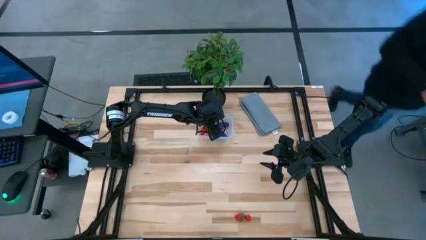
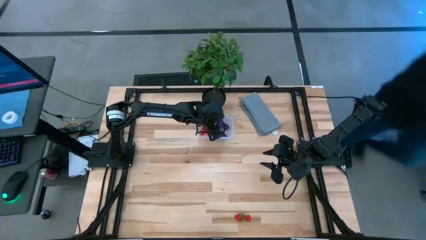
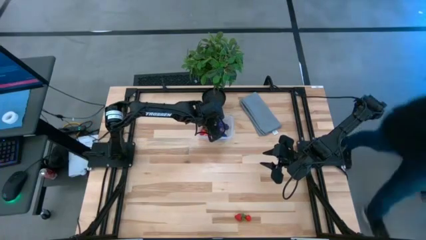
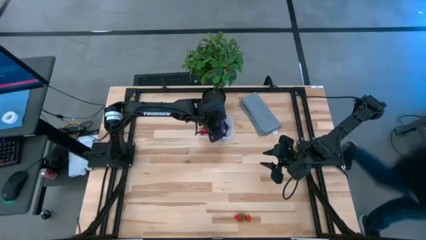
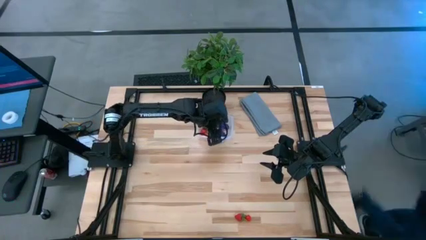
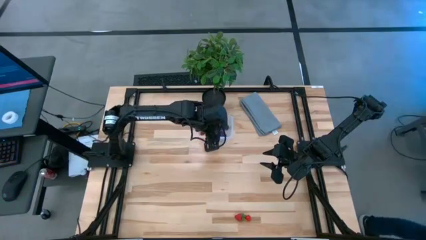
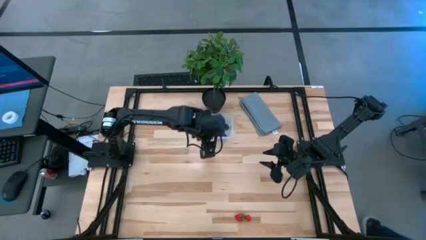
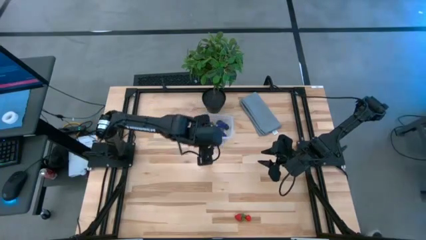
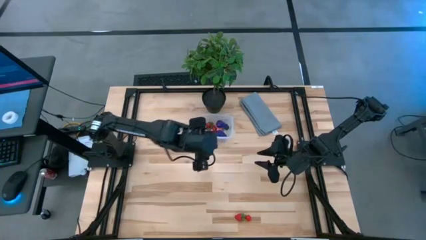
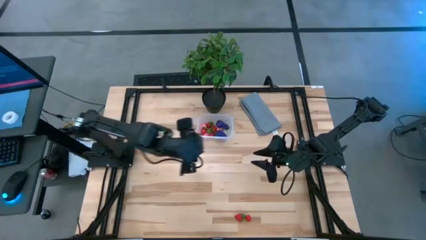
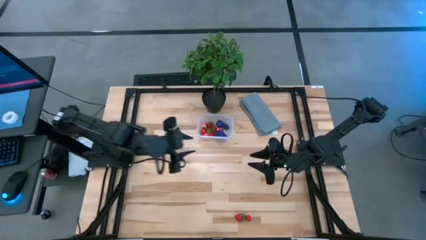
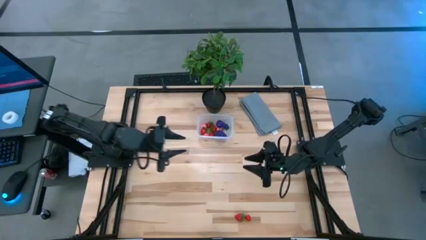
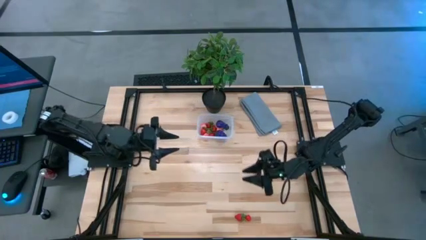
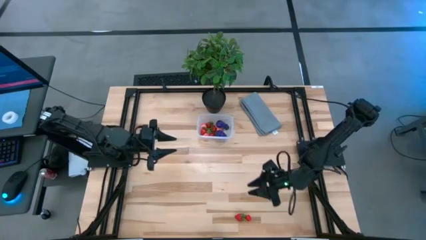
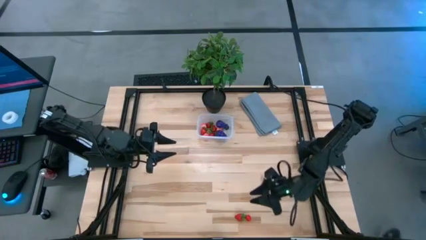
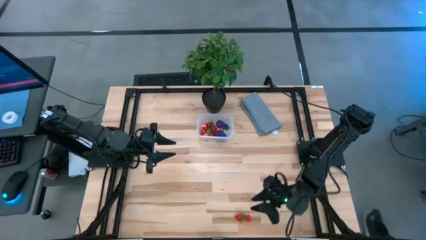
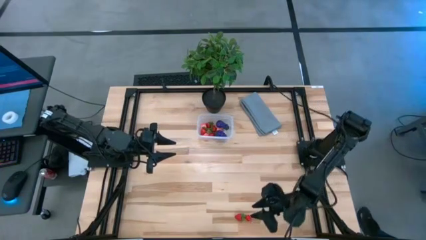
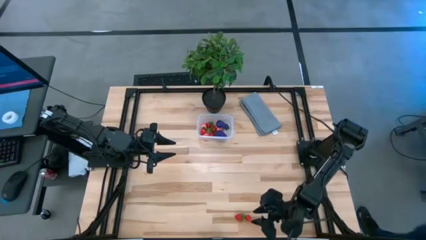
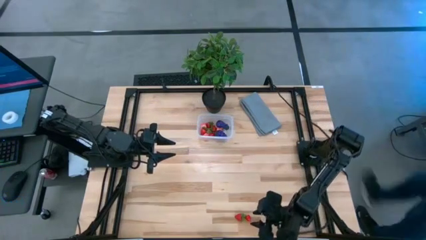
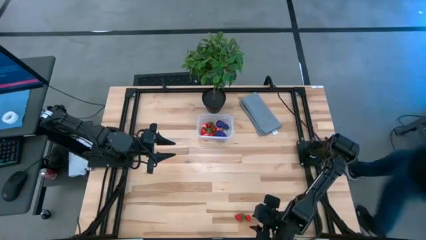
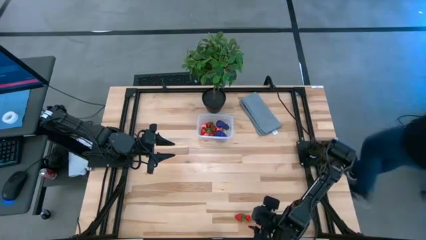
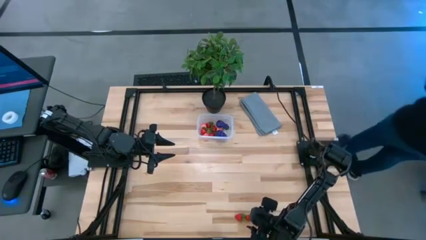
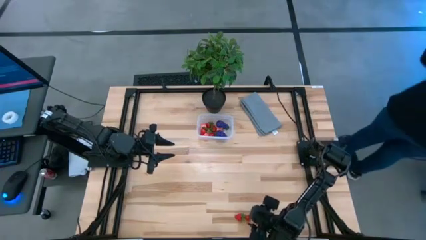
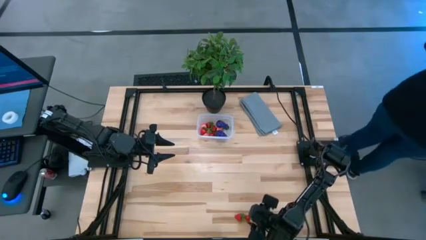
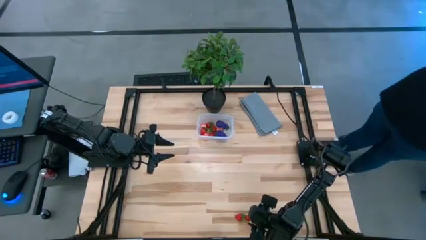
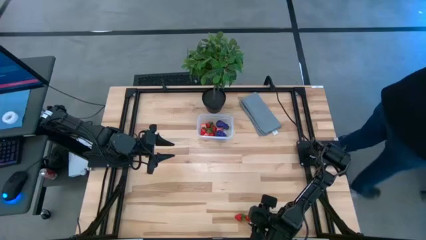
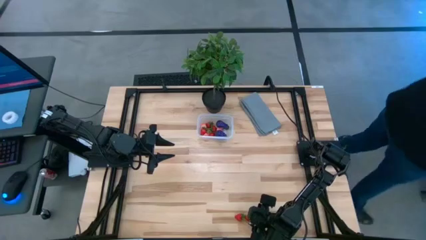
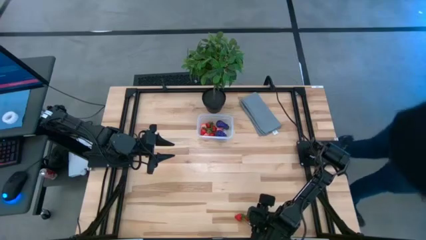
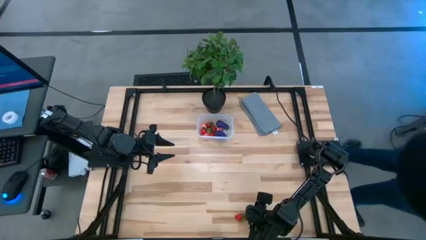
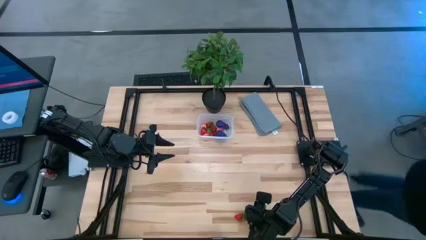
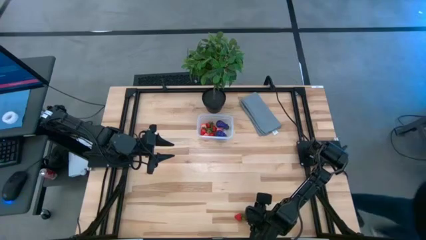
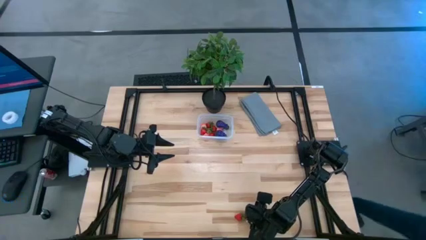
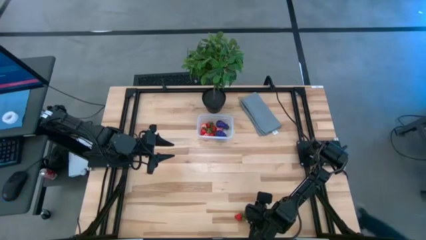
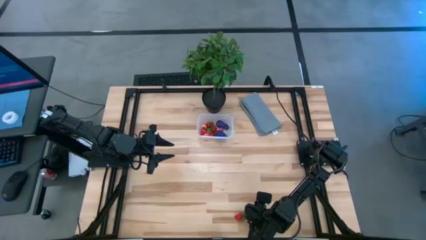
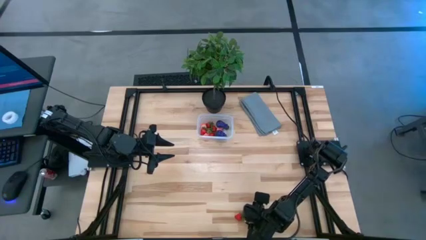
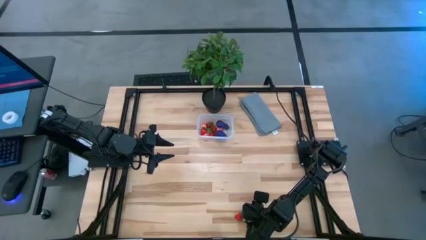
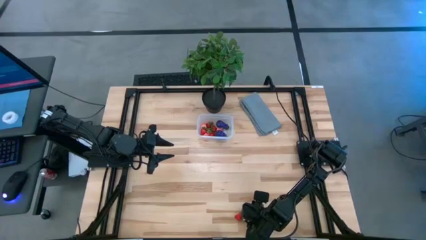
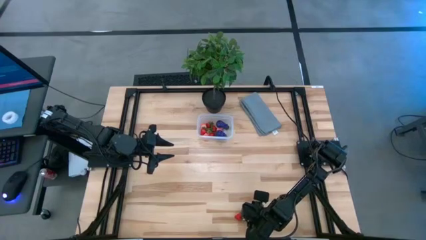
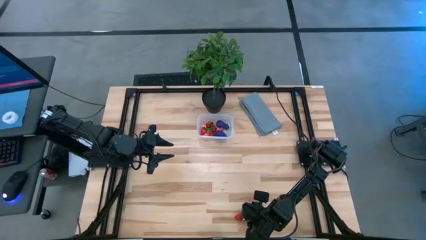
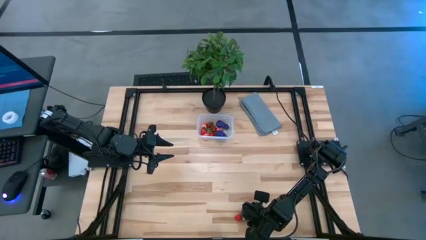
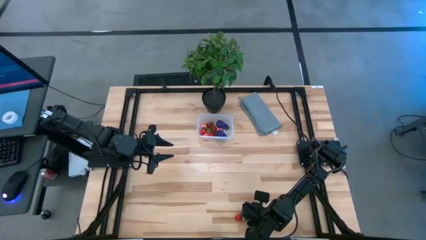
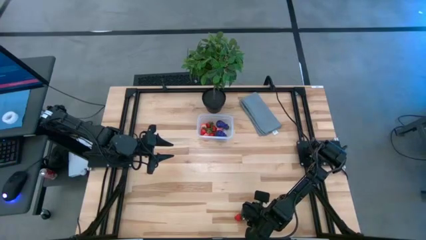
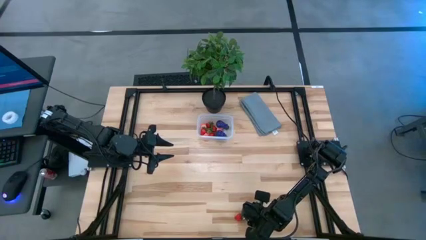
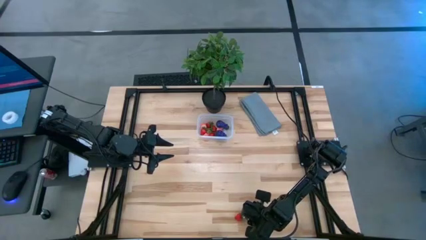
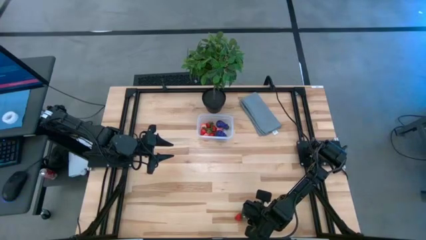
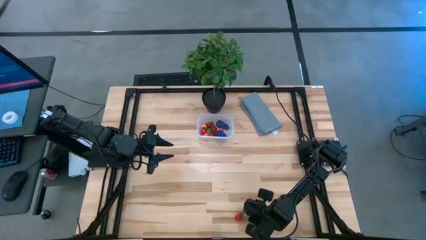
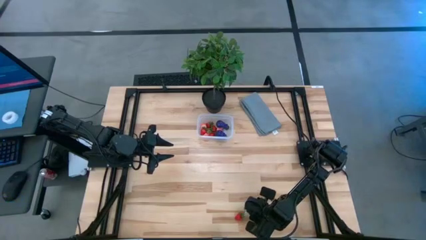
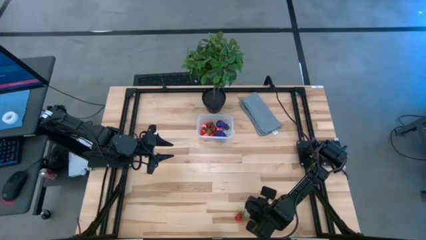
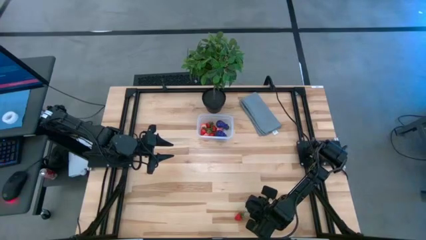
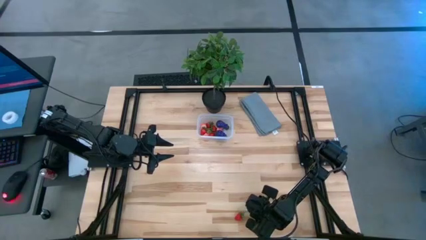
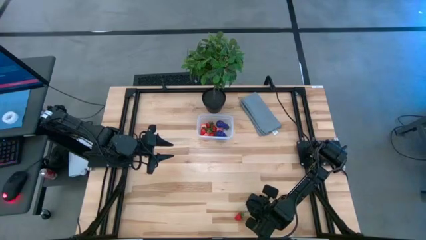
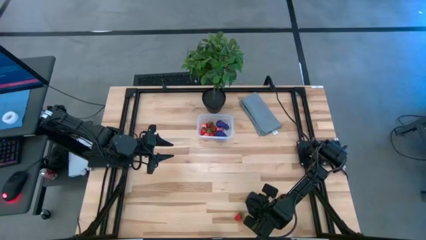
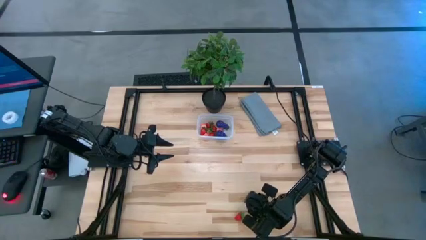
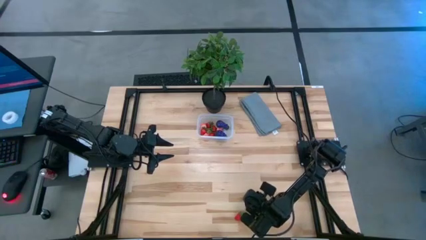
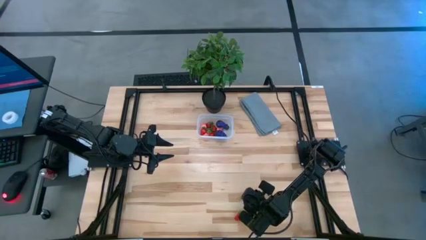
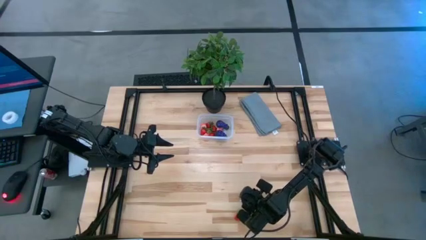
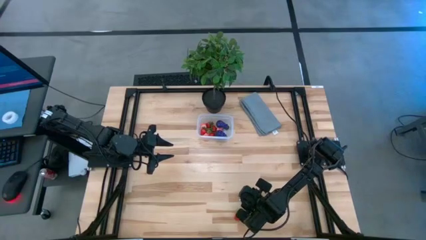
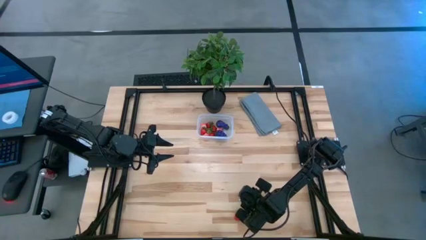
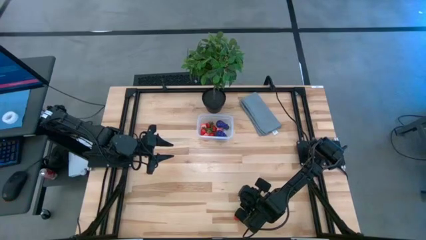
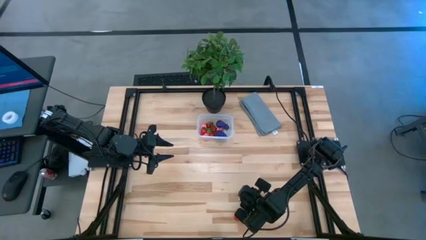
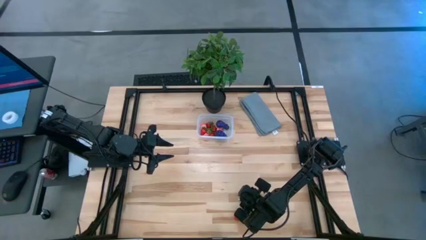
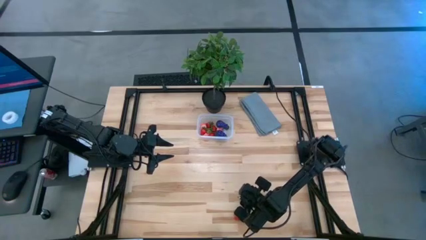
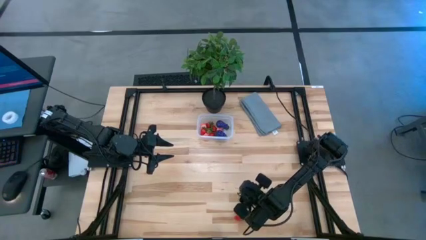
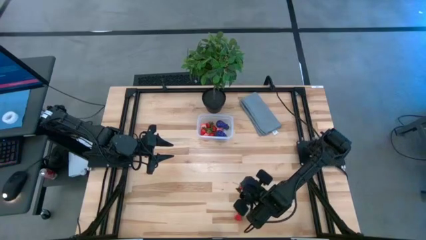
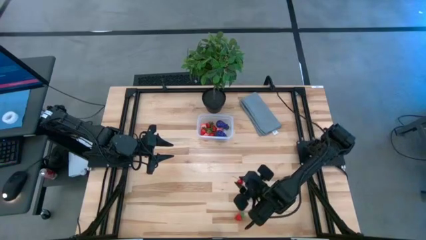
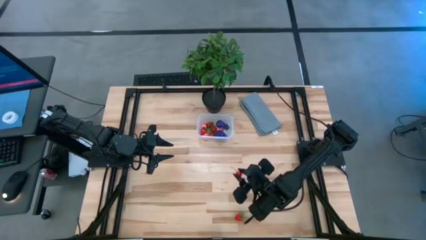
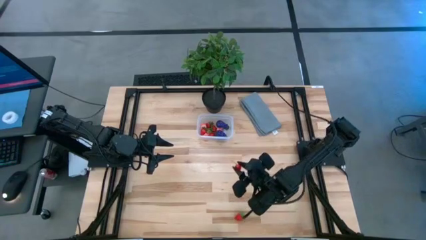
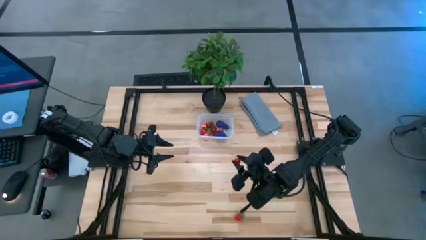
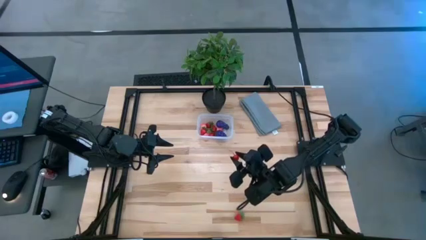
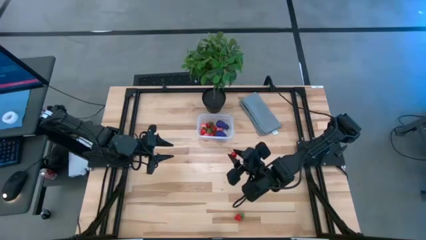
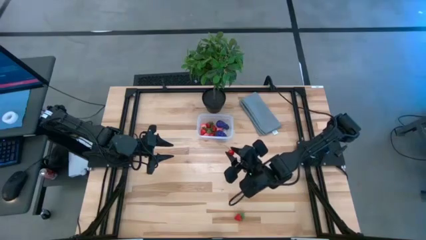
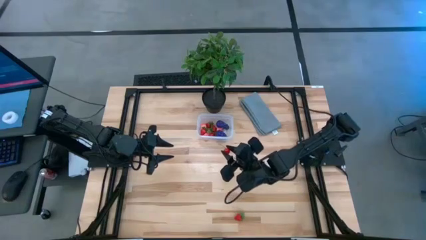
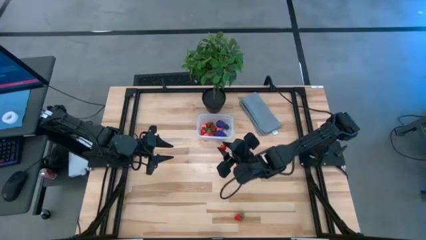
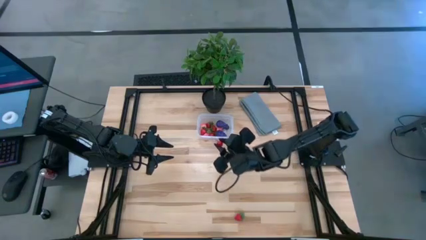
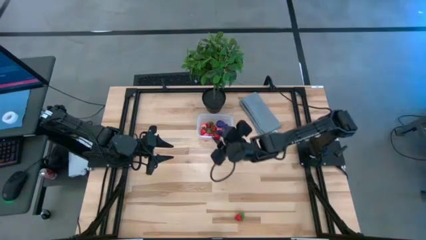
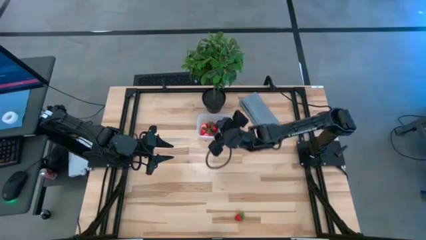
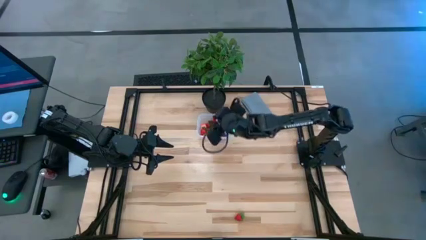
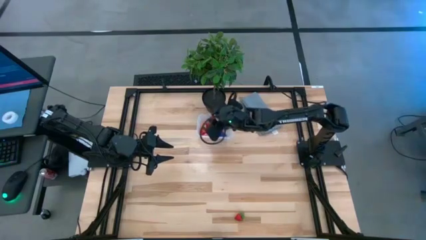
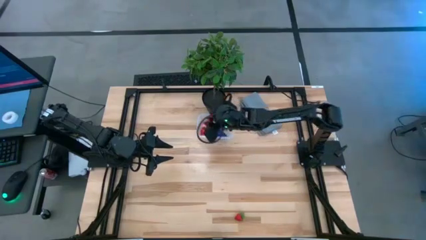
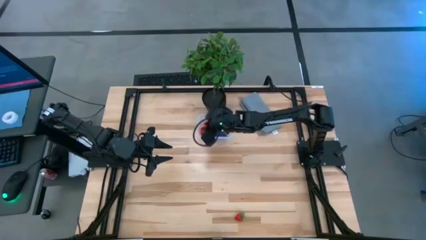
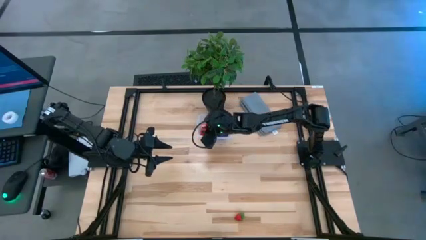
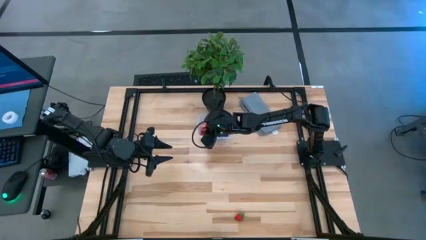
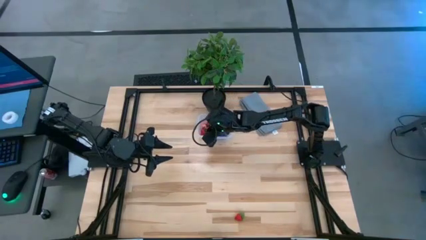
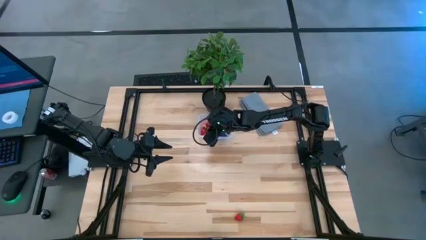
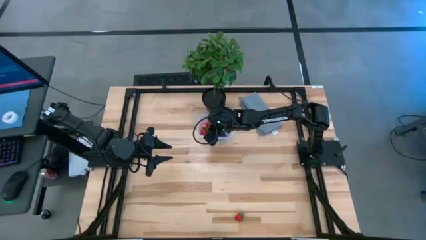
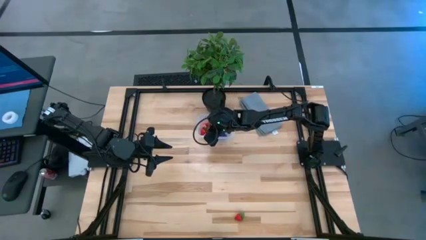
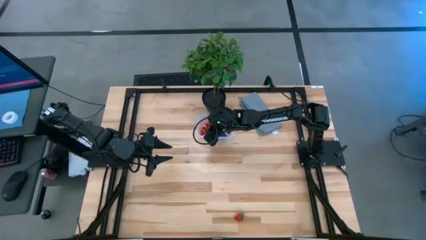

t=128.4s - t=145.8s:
Task: Pick and placing Produce into tupperware
Put the cherry into the transparent bin
